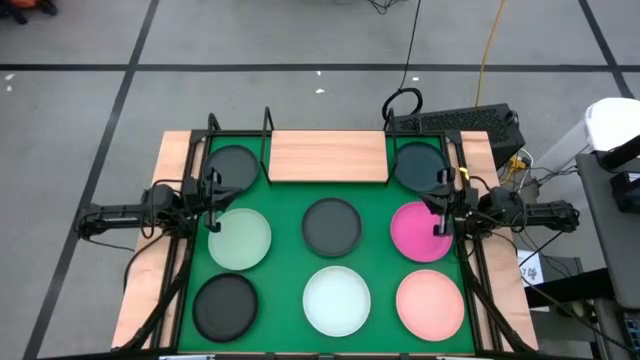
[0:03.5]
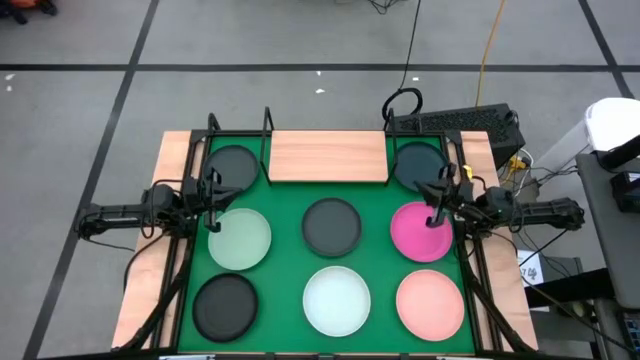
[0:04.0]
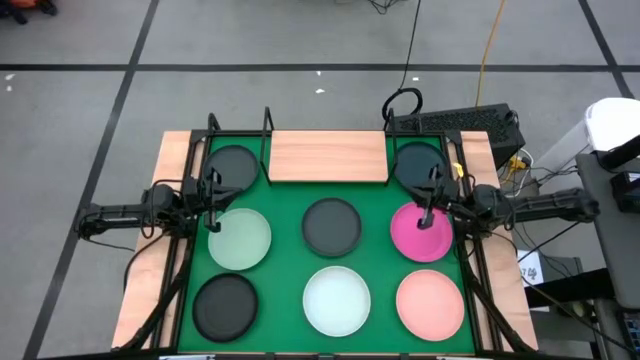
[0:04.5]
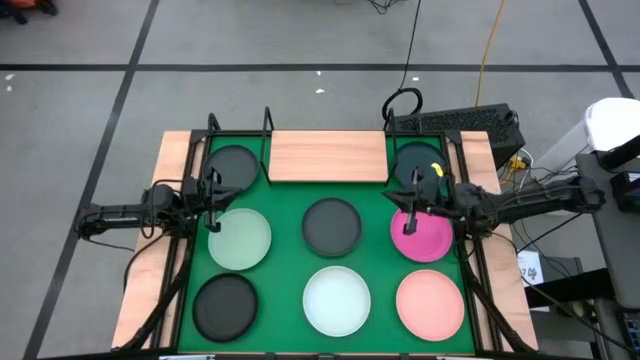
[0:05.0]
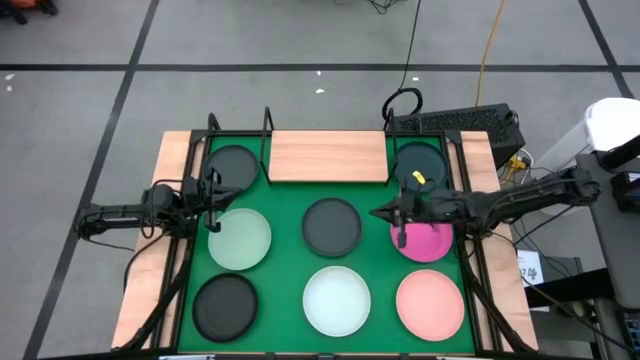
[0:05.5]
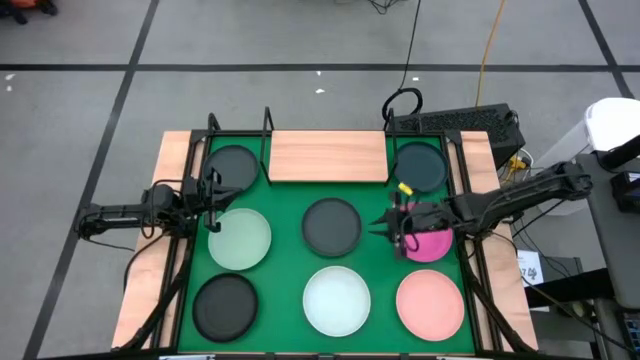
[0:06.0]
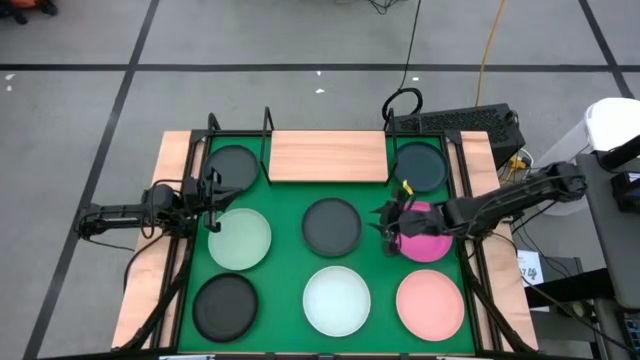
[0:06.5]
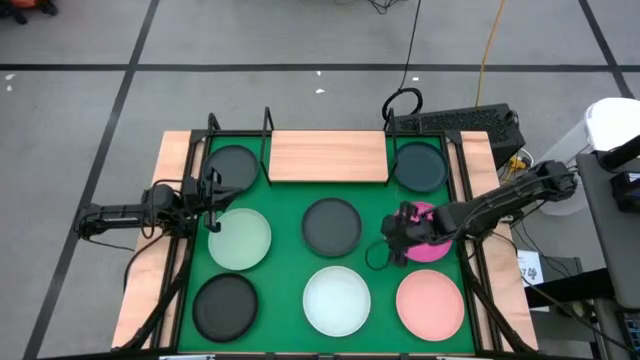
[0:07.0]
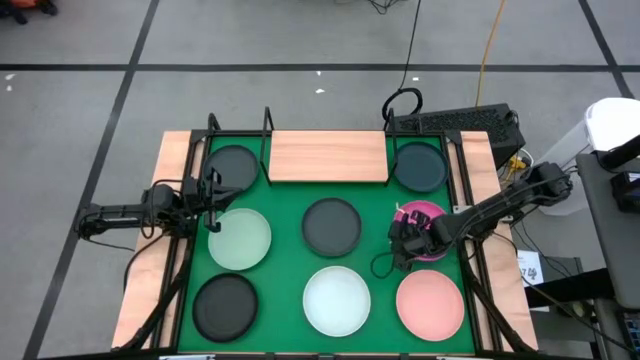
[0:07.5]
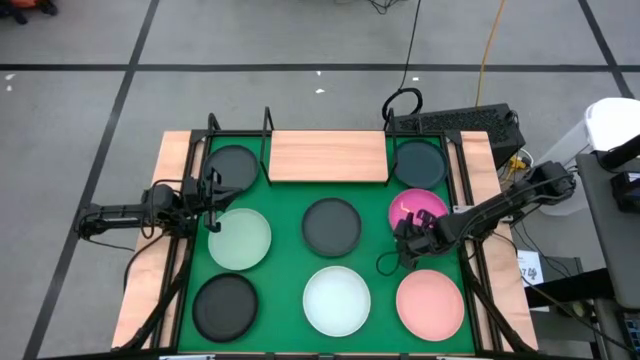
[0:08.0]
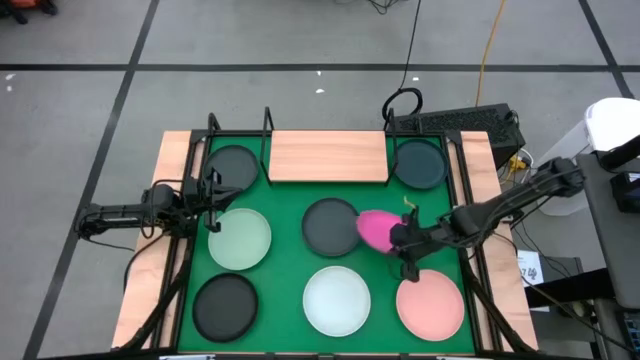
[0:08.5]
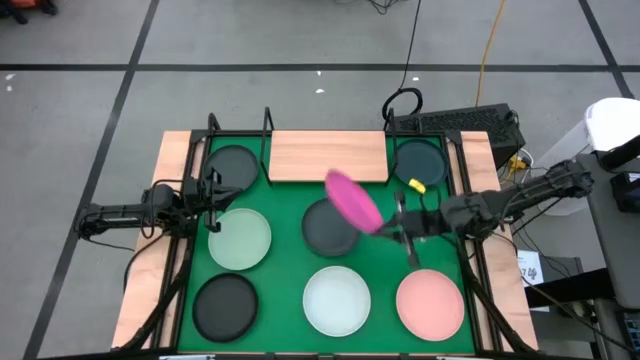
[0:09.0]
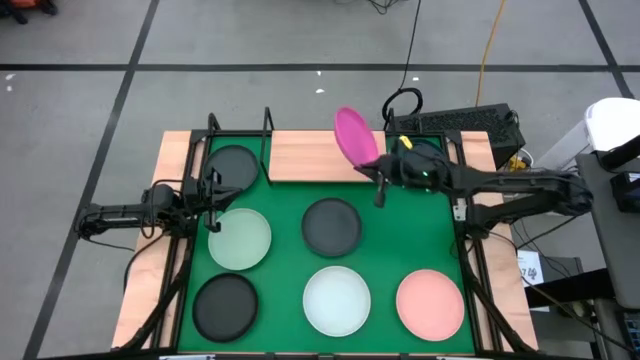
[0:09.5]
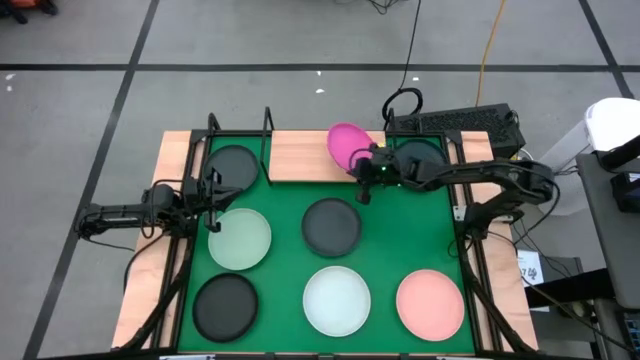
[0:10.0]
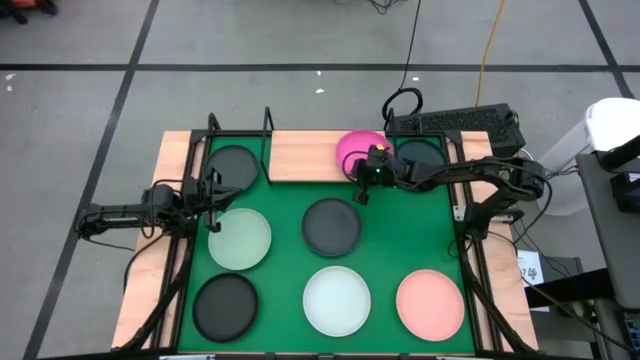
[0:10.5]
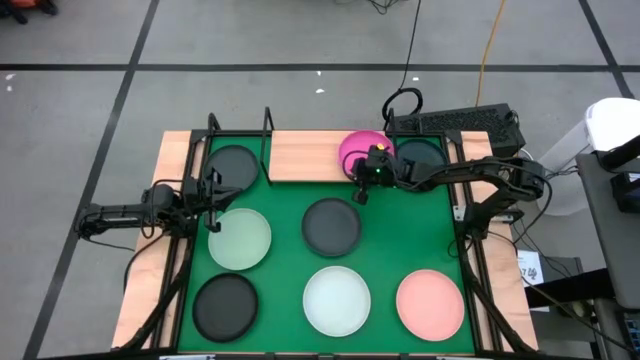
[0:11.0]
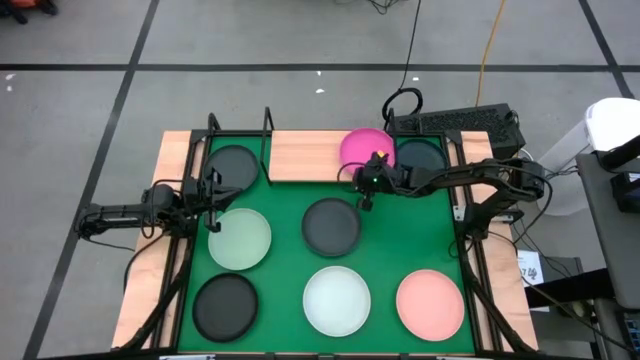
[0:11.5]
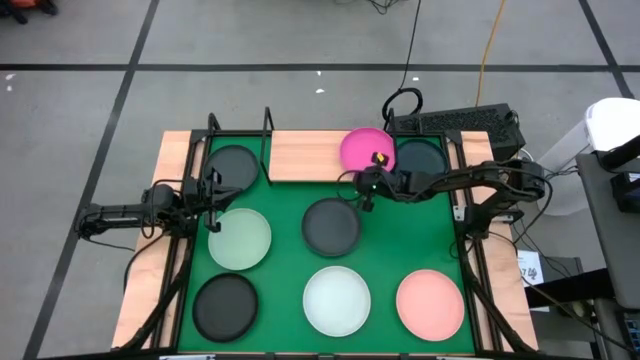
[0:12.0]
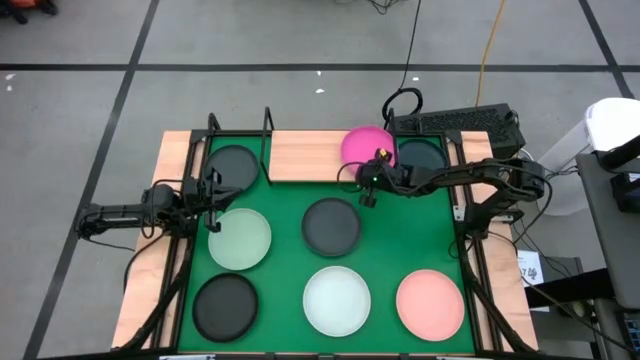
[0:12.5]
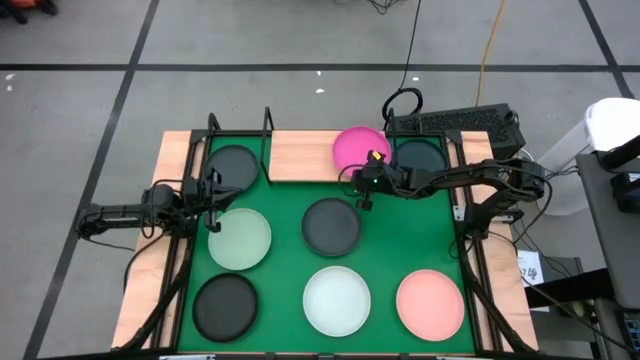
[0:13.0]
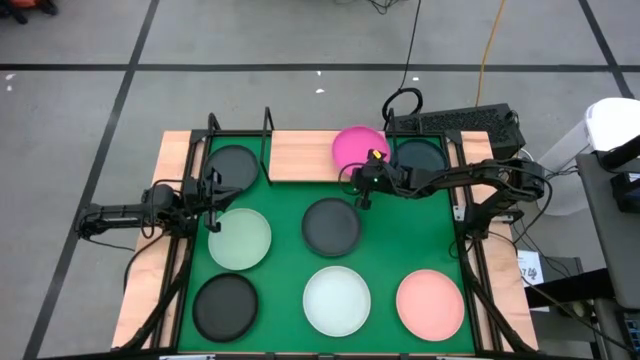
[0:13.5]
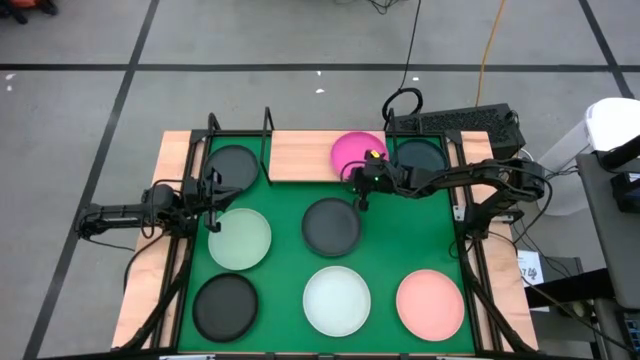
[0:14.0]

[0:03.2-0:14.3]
Task: Place and stack plates onto a shelf
Put the pink plate on the shelf

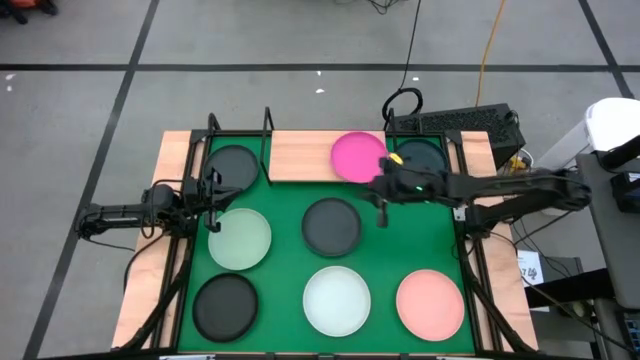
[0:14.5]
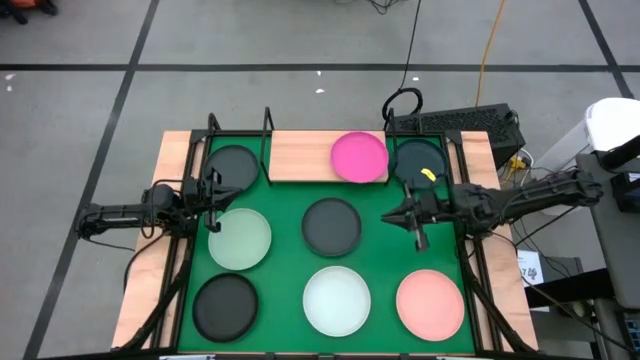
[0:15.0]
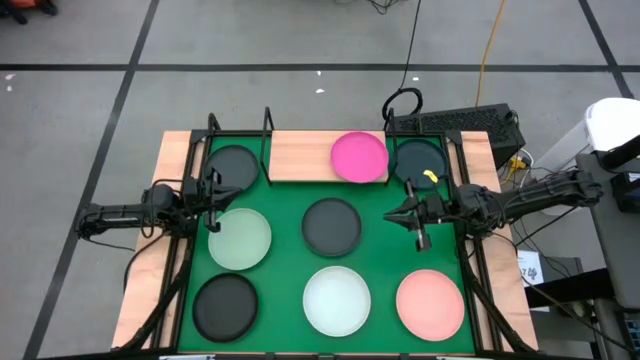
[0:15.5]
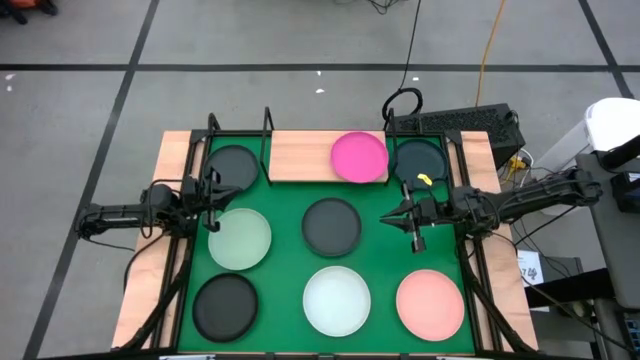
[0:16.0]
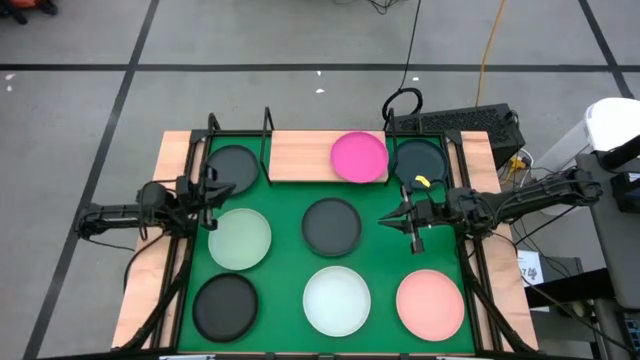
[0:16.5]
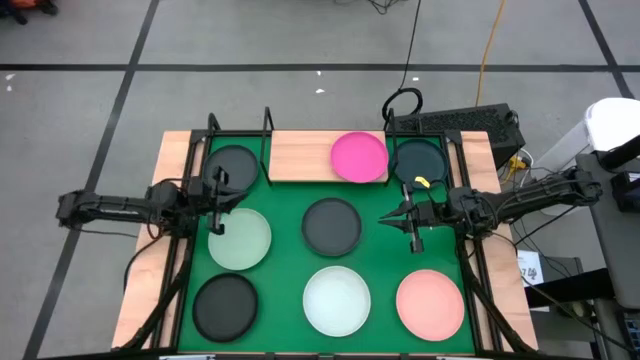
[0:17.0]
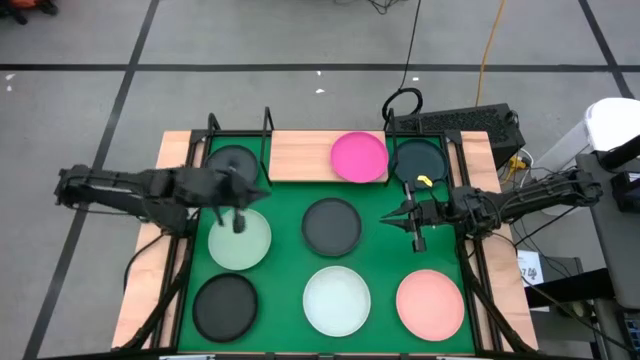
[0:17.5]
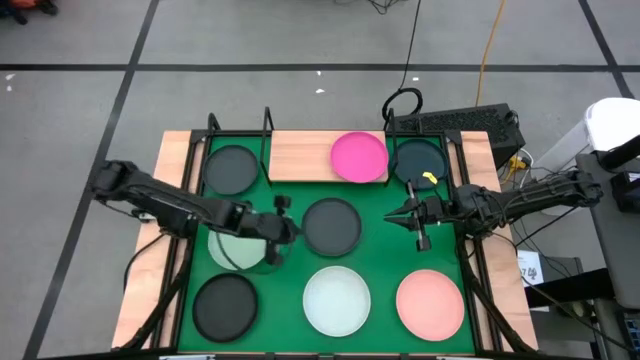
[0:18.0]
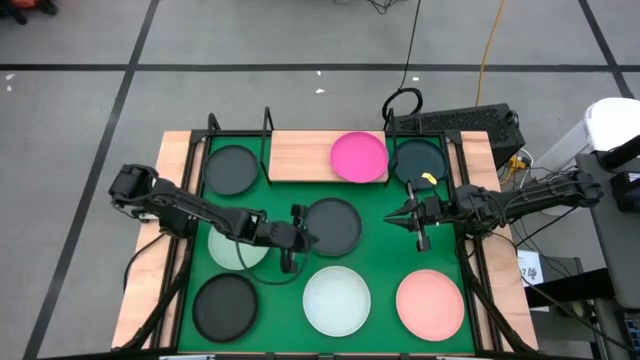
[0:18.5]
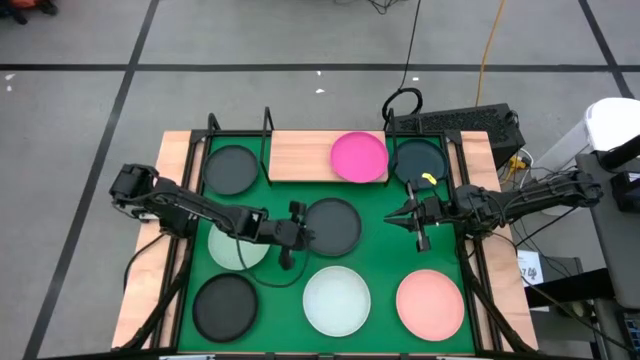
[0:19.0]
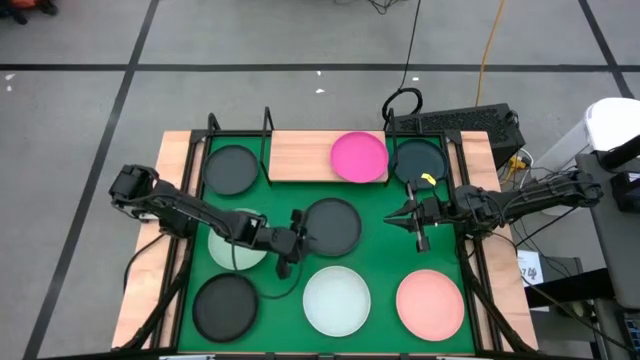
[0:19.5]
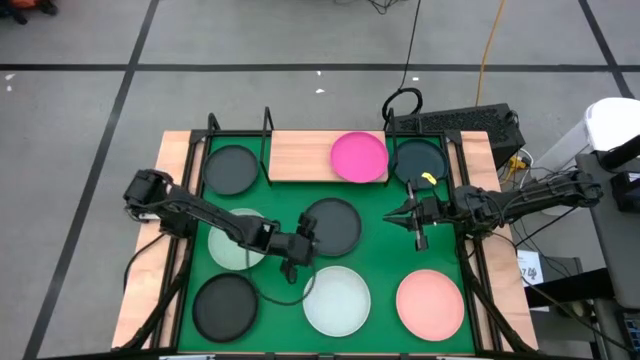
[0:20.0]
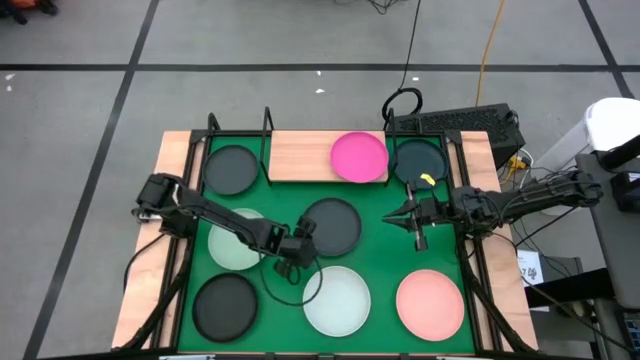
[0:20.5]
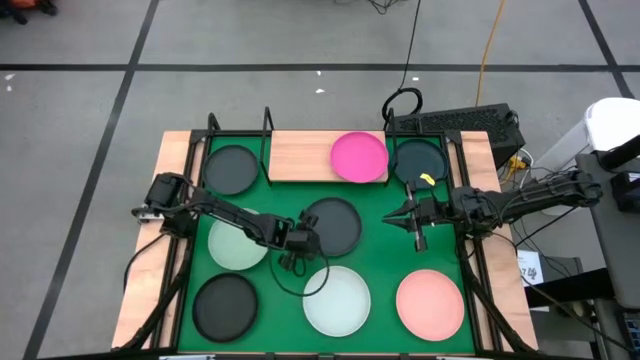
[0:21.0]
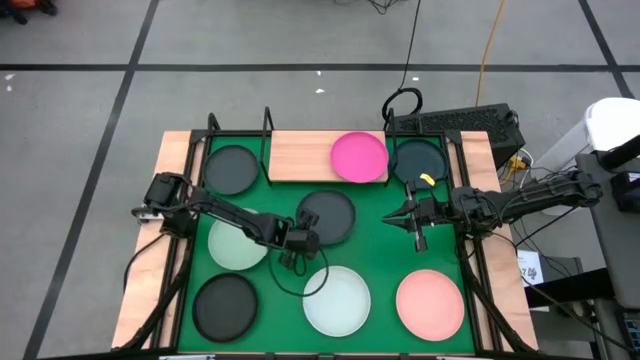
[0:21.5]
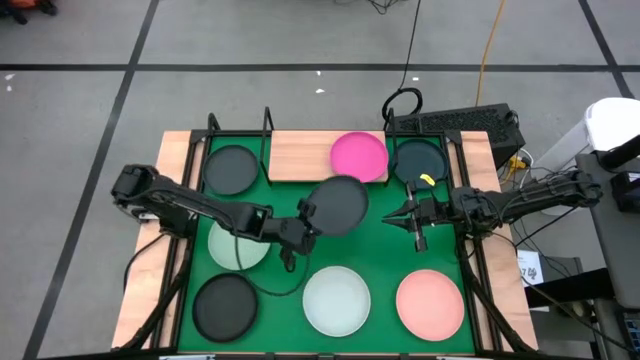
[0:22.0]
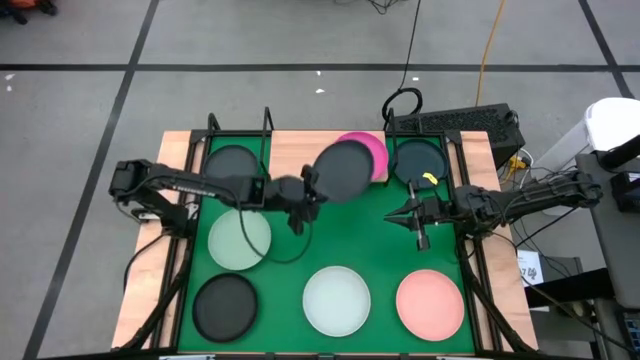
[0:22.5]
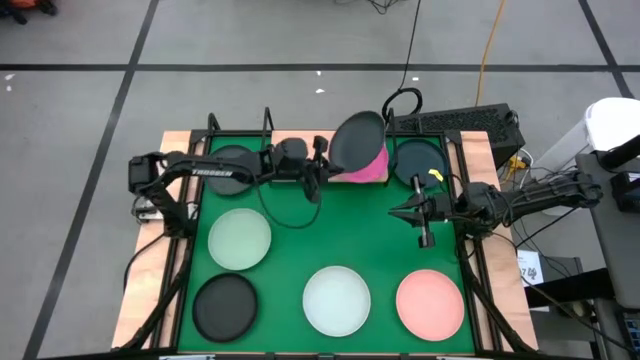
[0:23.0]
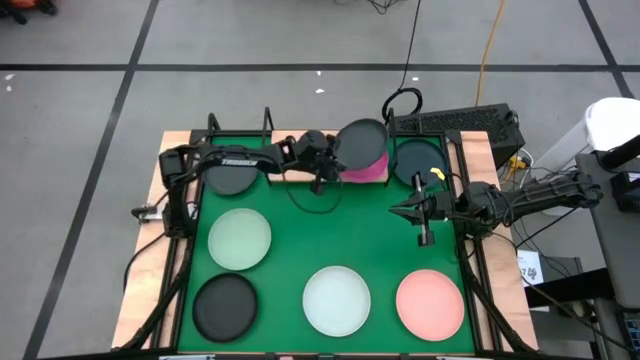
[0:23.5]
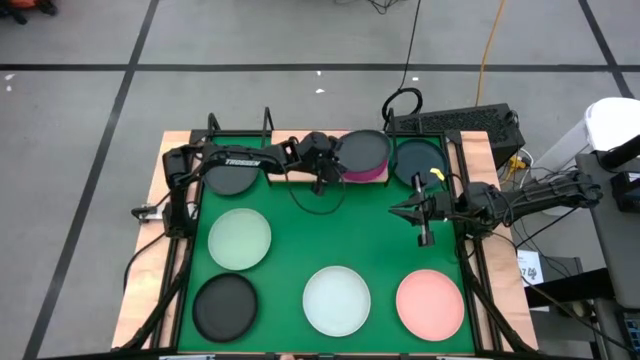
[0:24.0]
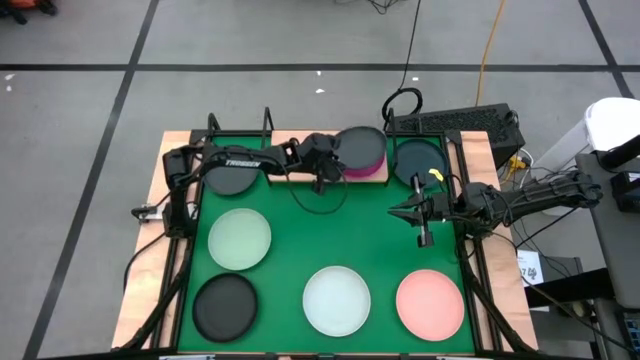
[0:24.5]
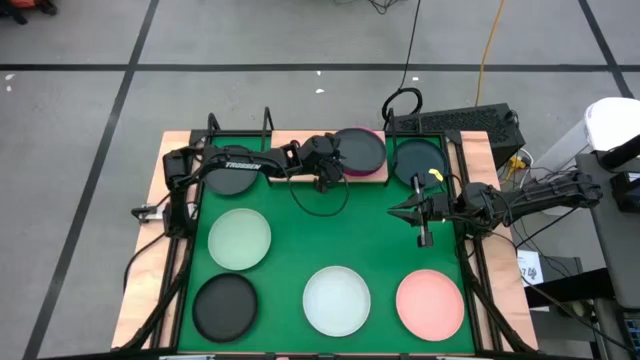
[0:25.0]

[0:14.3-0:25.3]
Stack the right black plate on top of the pink plate on the shelf
